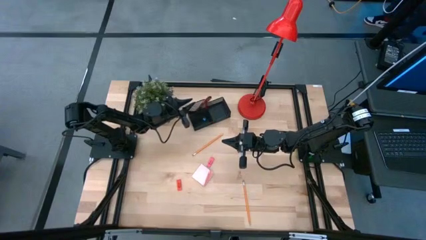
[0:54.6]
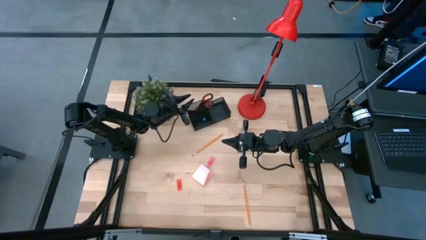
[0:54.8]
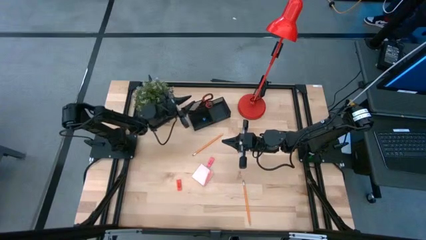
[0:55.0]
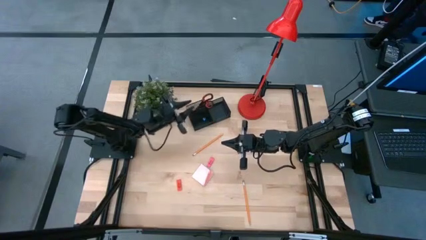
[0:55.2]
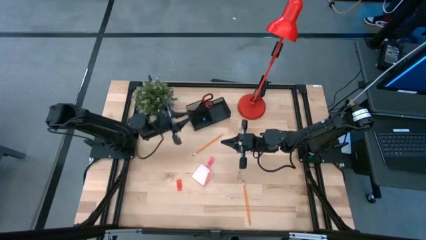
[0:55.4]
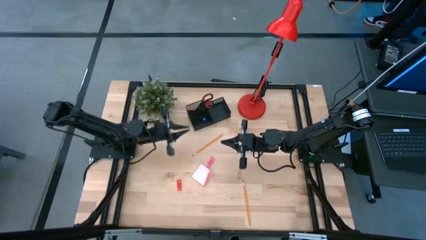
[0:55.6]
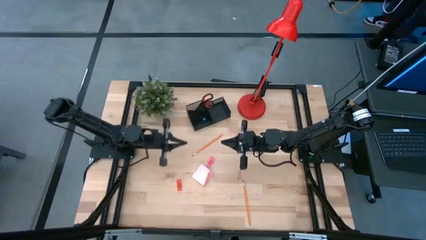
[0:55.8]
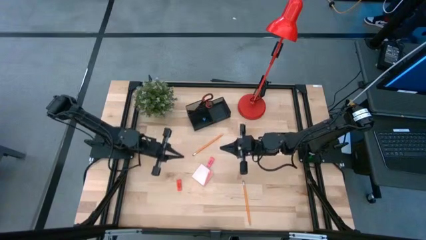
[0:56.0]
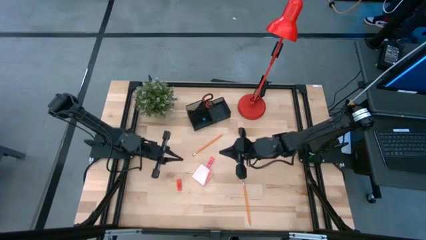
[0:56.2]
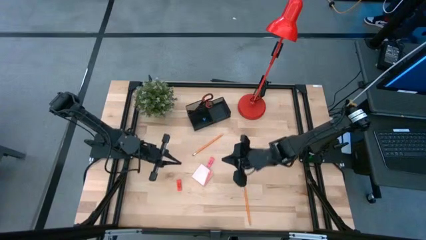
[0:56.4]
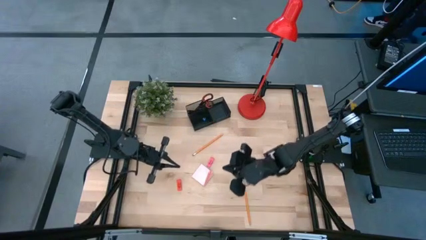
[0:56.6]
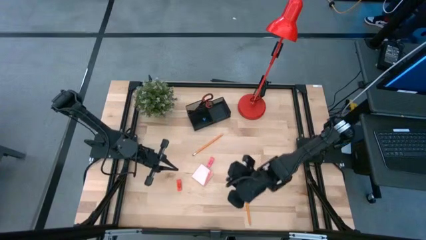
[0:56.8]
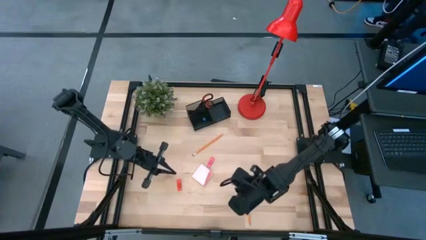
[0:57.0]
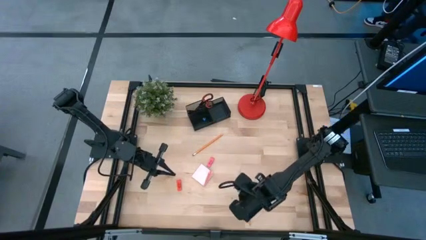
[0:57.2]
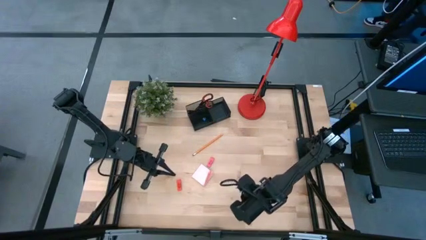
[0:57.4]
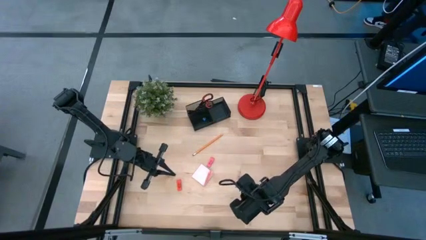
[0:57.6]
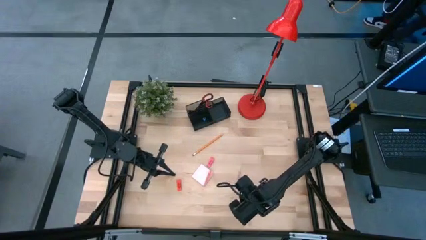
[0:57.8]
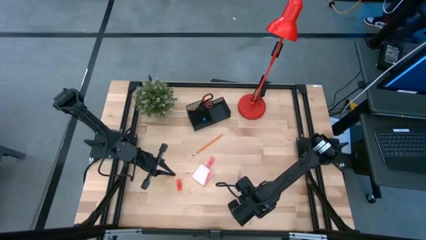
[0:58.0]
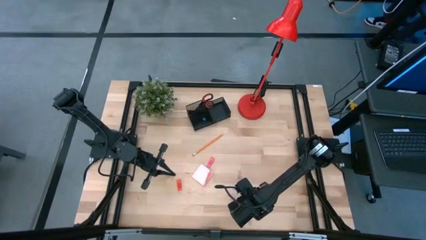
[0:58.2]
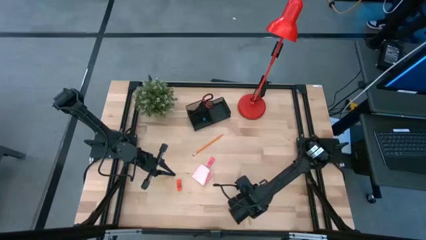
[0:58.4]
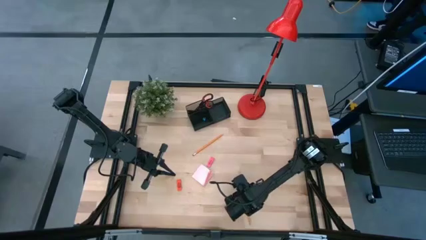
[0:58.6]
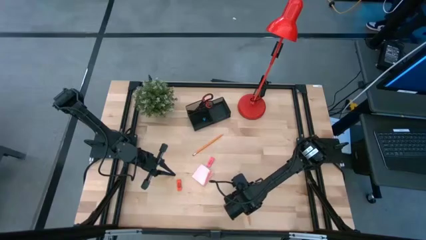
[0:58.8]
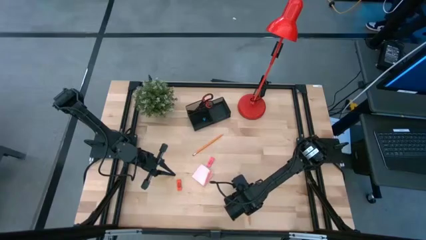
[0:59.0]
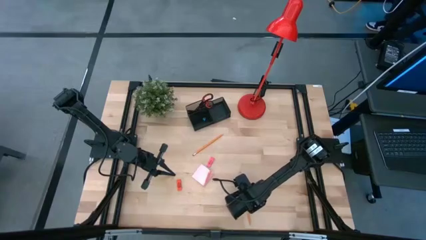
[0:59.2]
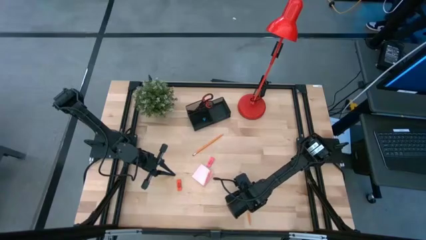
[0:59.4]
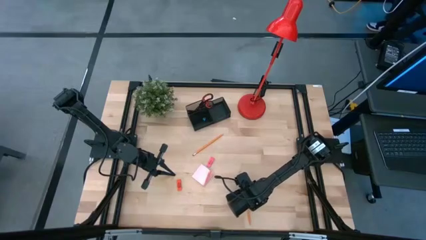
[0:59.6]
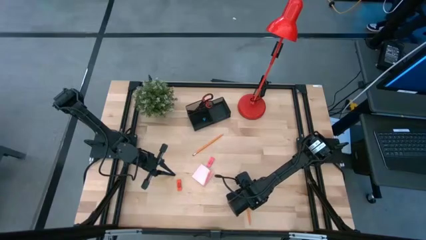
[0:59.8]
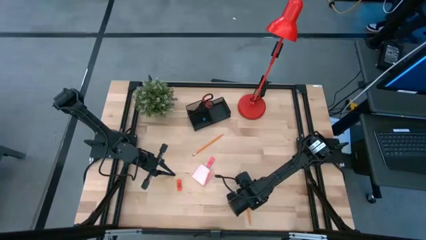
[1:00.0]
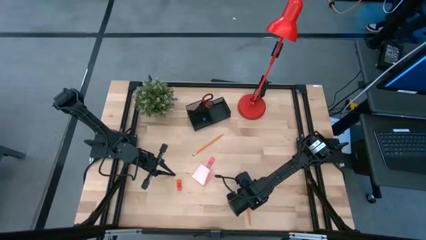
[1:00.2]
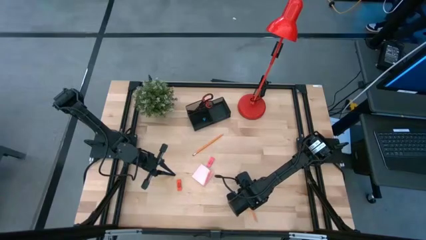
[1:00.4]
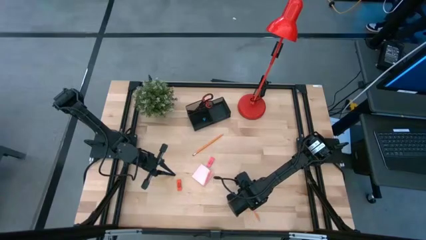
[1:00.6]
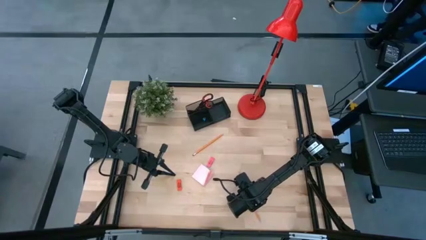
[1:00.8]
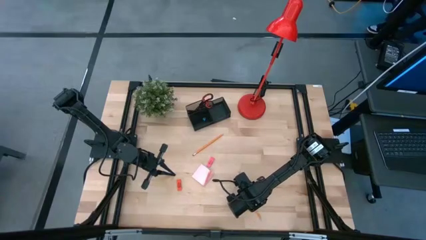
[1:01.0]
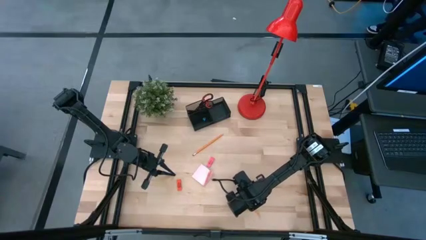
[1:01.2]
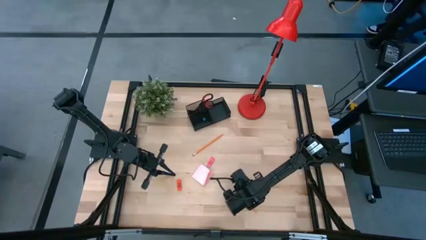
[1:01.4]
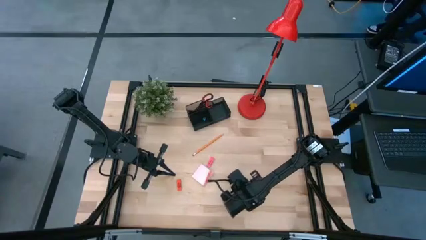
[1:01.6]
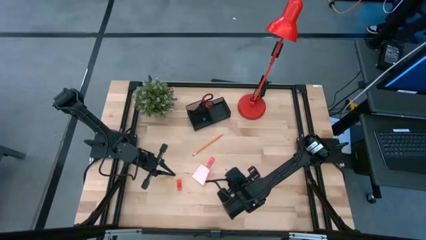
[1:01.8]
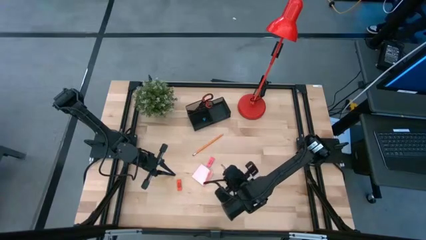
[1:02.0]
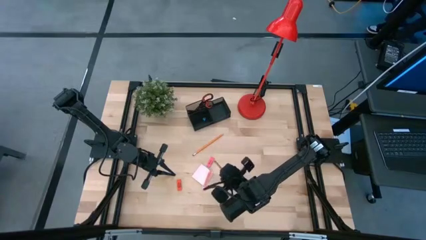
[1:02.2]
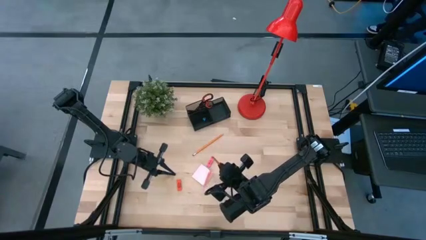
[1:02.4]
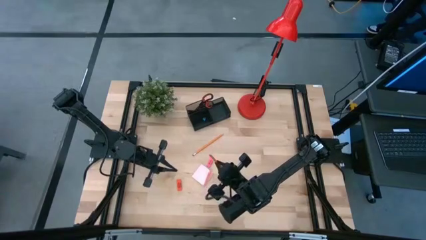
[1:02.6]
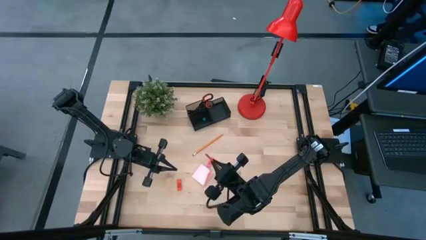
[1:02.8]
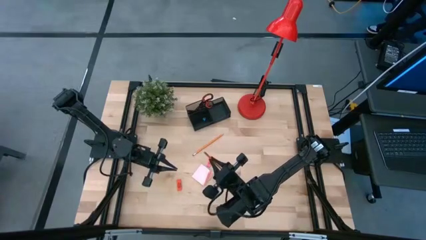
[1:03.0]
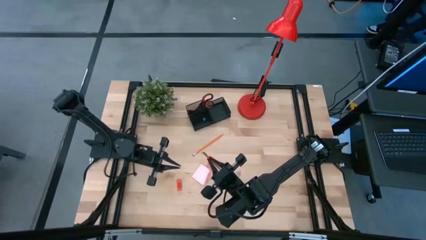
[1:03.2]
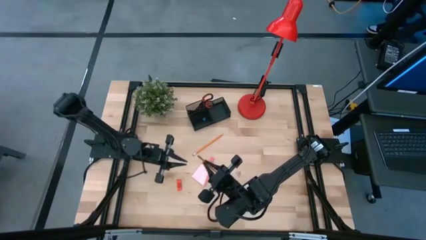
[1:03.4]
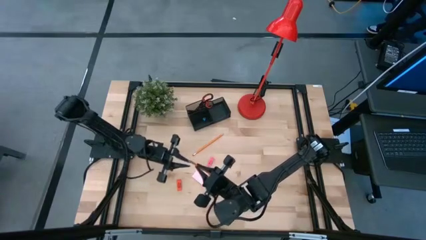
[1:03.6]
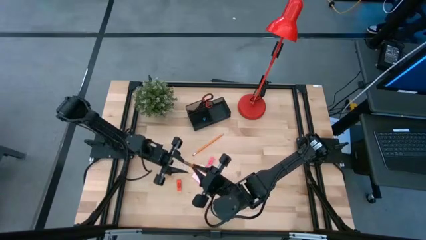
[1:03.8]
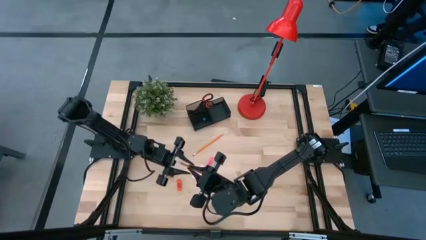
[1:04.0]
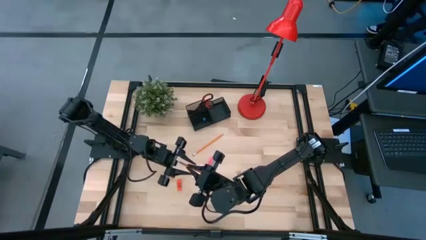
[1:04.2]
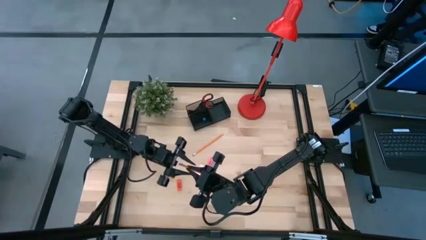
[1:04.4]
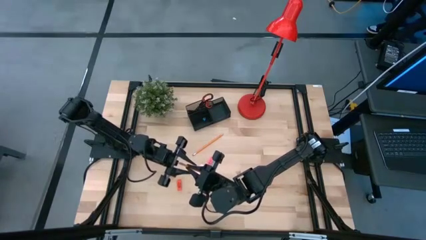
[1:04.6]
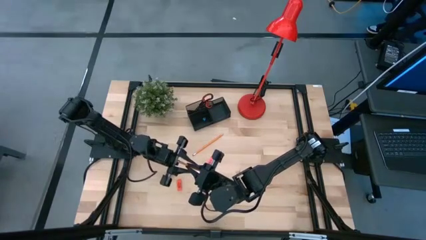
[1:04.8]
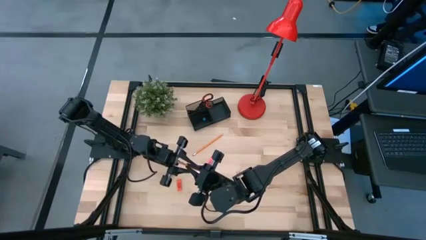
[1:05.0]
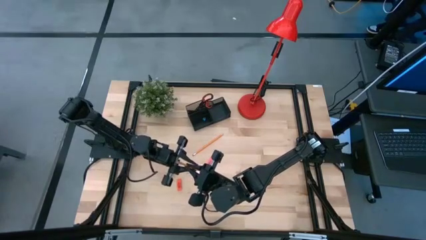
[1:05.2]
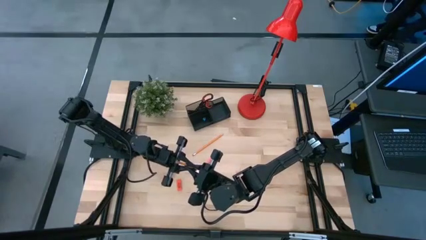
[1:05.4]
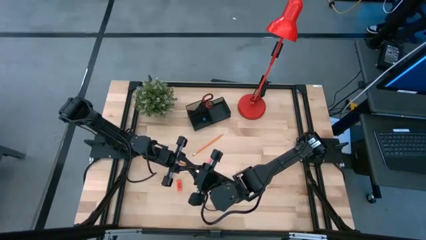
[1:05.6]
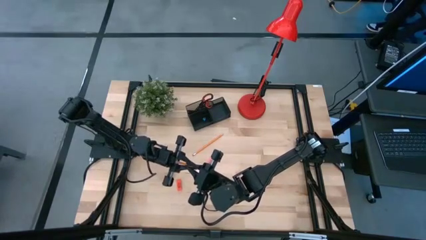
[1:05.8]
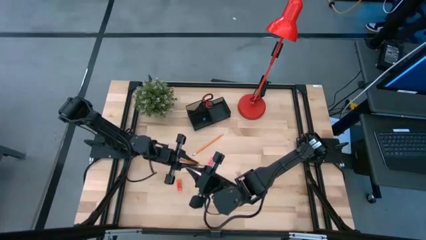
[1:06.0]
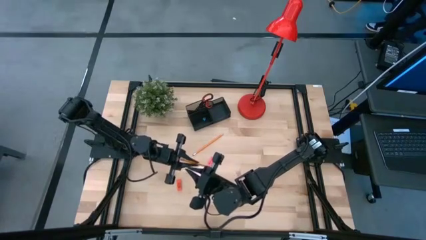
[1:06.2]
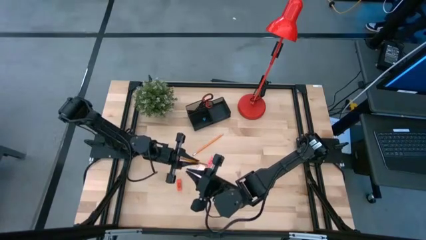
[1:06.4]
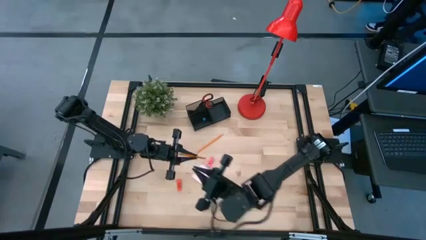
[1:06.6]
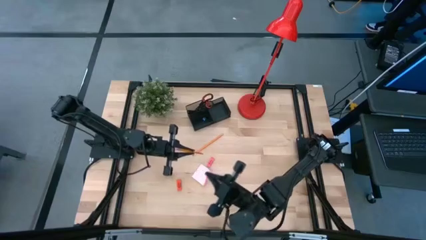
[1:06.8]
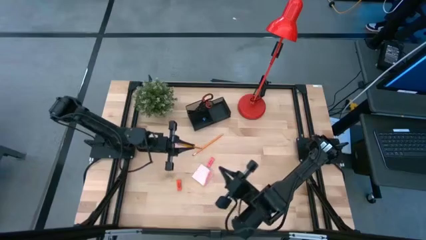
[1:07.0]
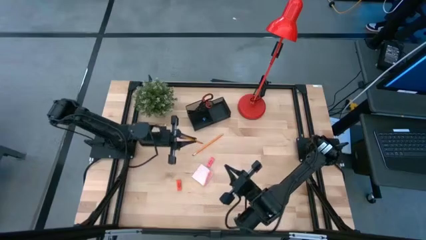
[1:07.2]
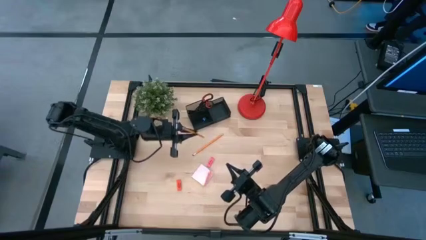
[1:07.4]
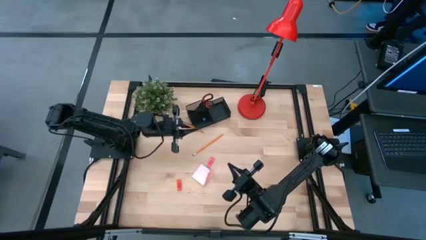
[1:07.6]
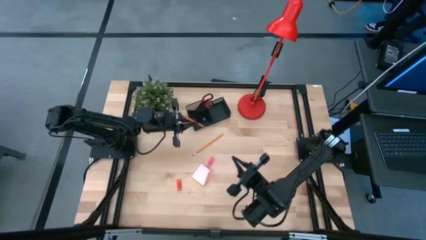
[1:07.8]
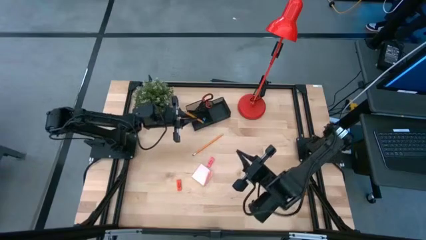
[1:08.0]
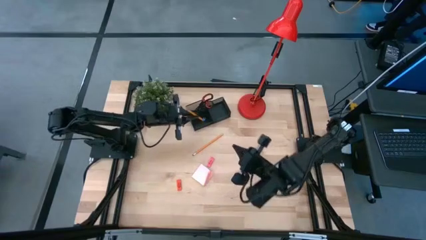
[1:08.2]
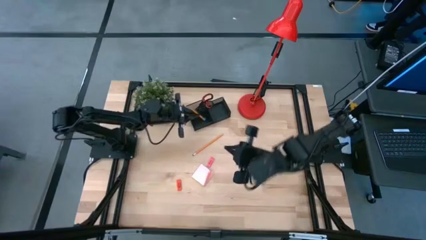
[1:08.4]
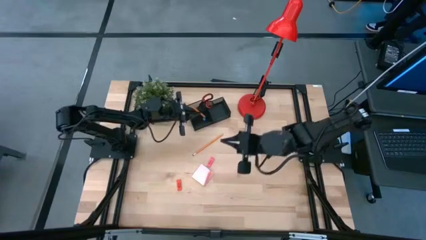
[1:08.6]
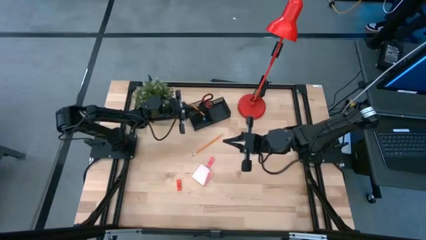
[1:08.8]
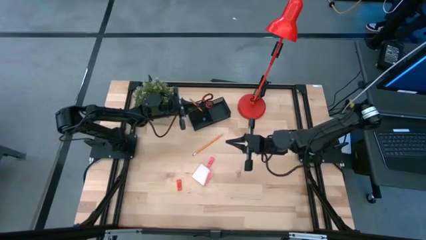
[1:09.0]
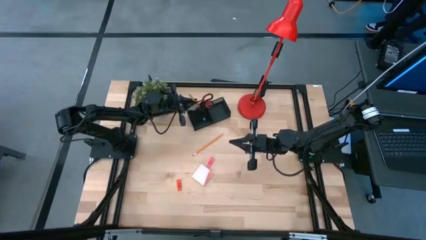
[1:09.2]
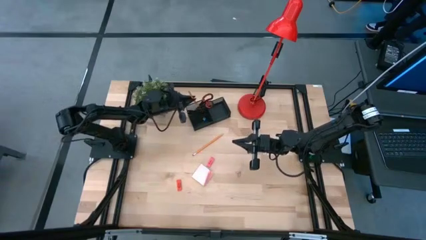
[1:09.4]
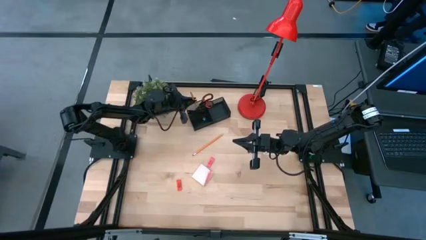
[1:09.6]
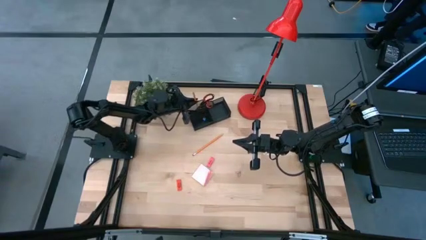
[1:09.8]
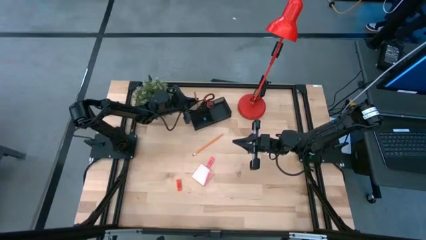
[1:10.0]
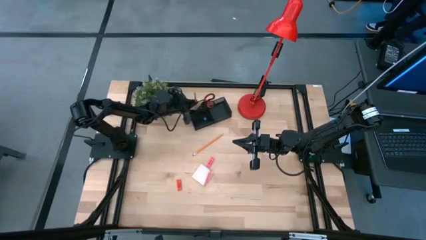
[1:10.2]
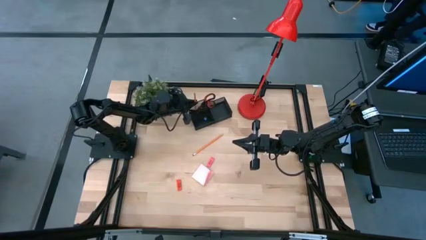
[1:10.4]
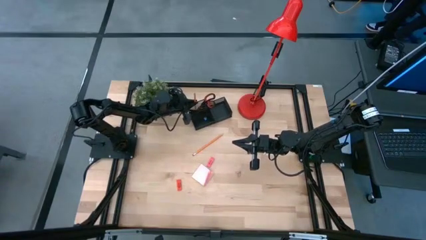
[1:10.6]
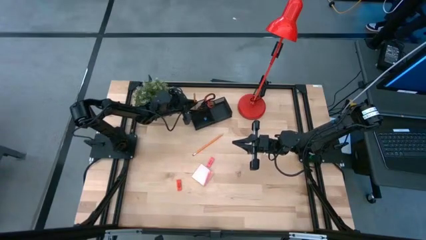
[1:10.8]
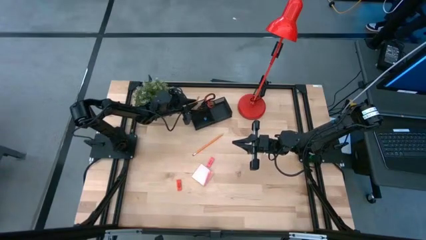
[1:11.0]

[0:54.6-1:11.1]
Task: Pick and place office supplies into organizer
Put the bottom orange pencil into the black desk organizer
